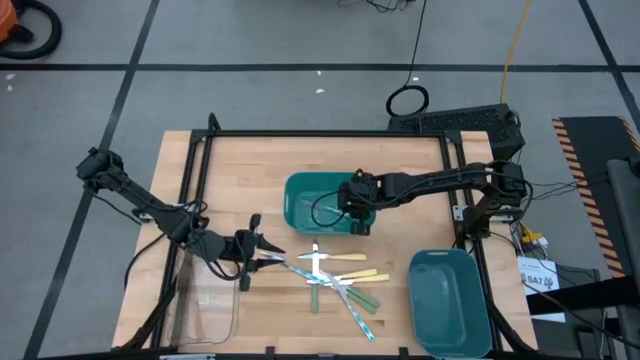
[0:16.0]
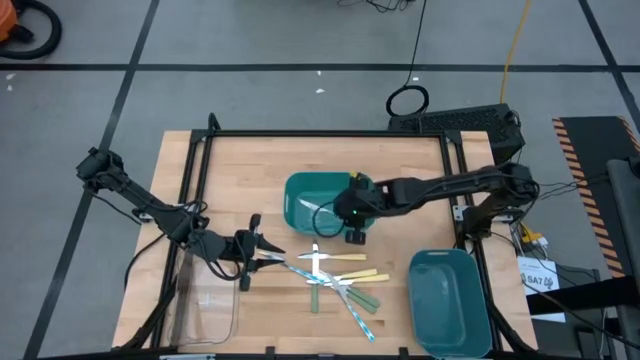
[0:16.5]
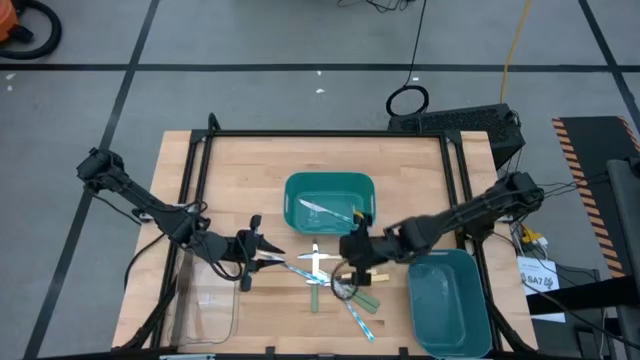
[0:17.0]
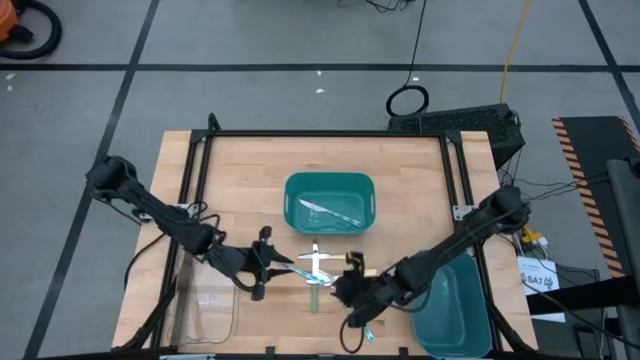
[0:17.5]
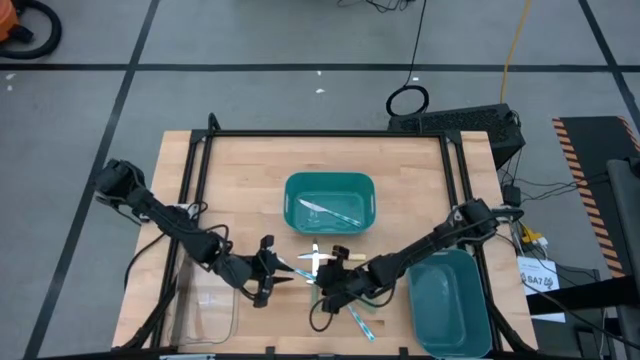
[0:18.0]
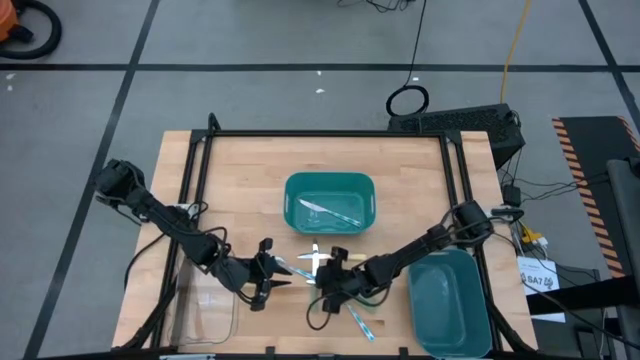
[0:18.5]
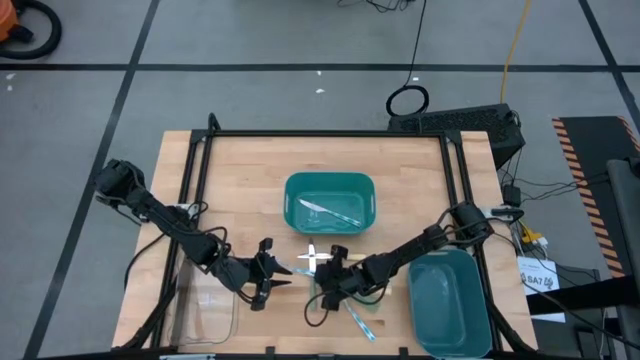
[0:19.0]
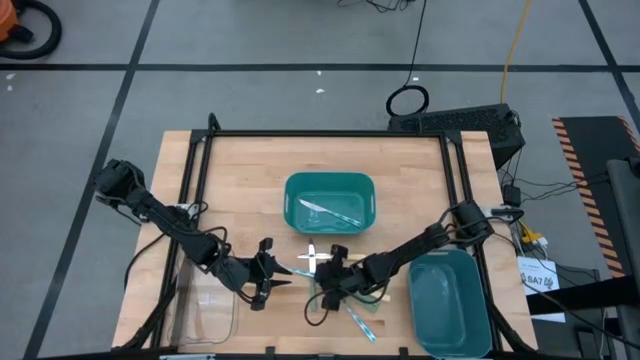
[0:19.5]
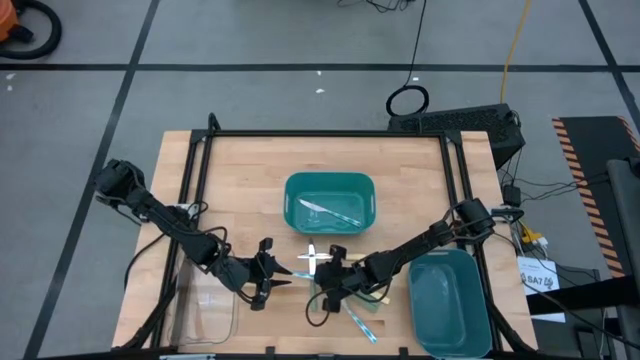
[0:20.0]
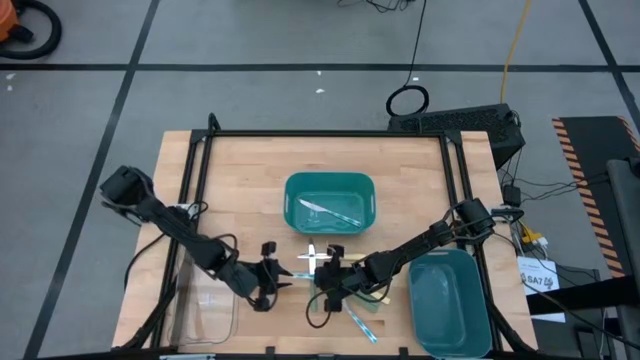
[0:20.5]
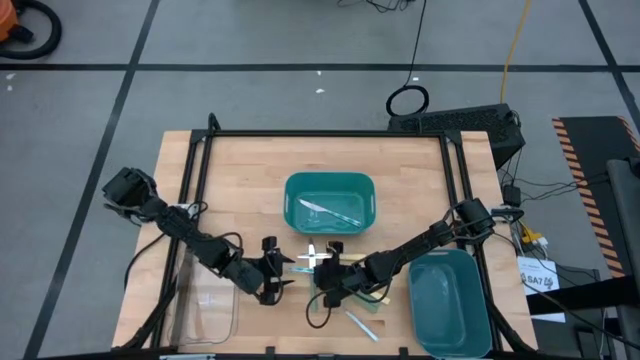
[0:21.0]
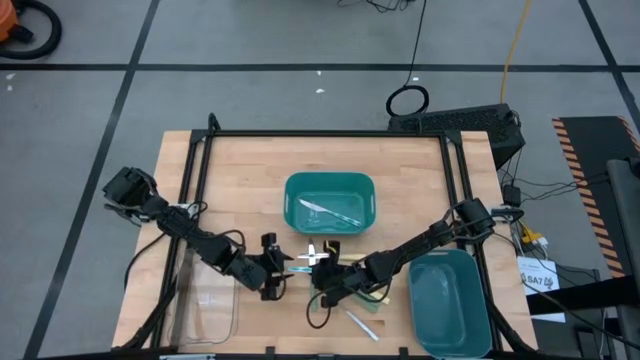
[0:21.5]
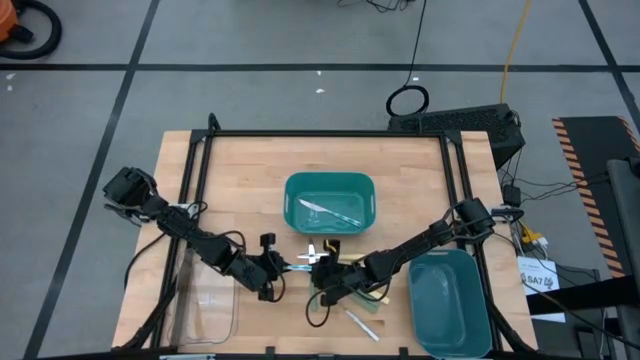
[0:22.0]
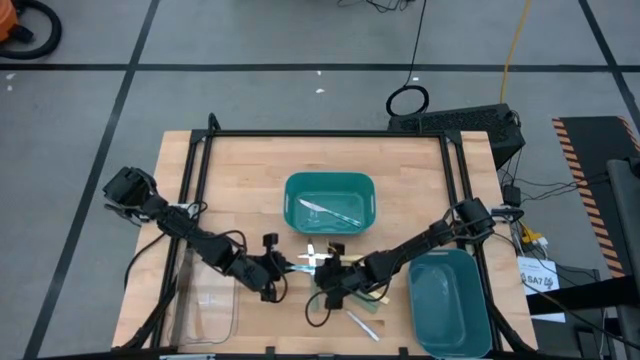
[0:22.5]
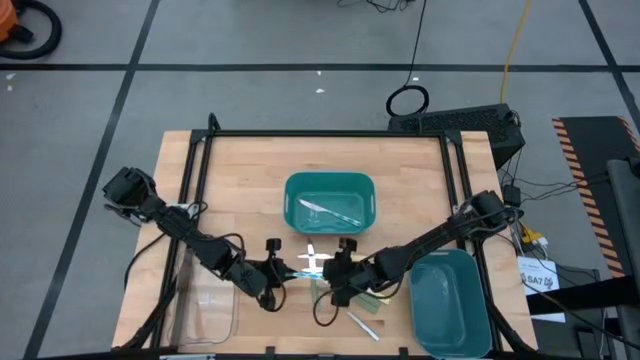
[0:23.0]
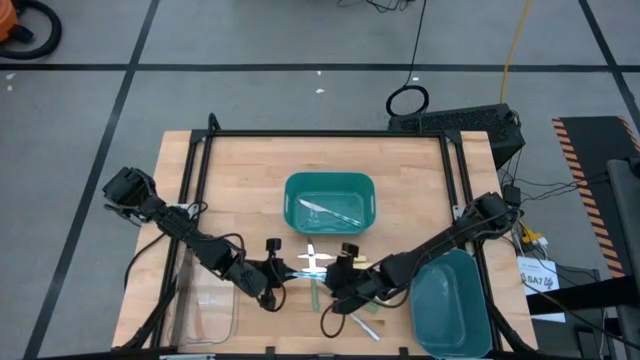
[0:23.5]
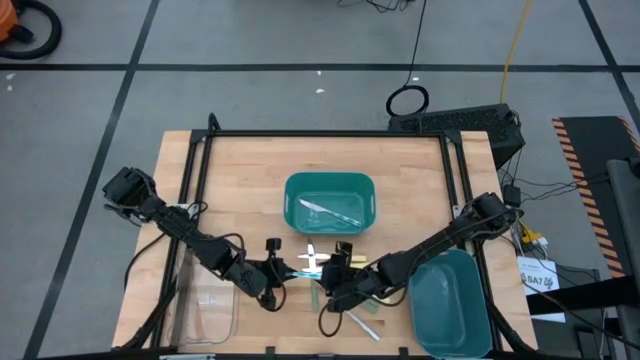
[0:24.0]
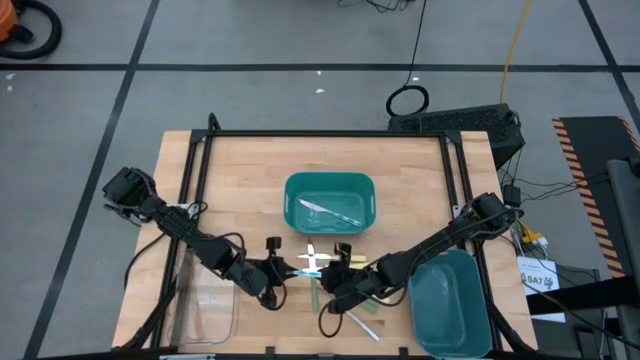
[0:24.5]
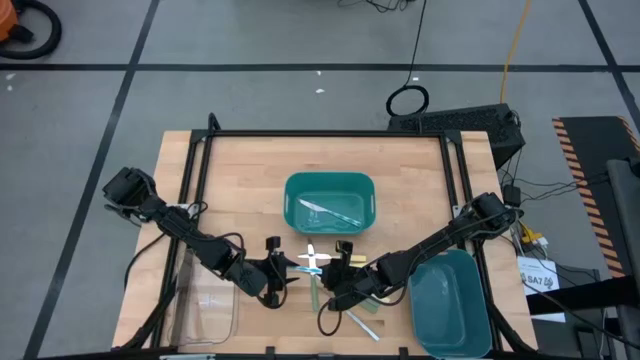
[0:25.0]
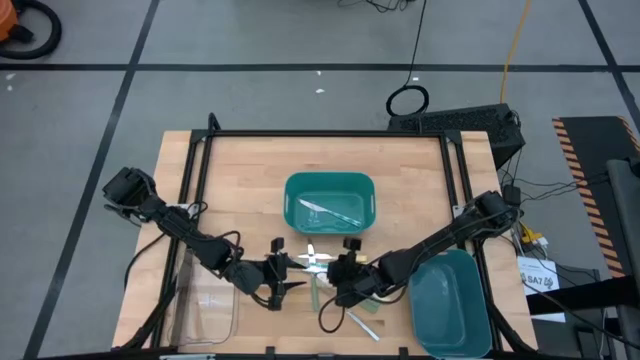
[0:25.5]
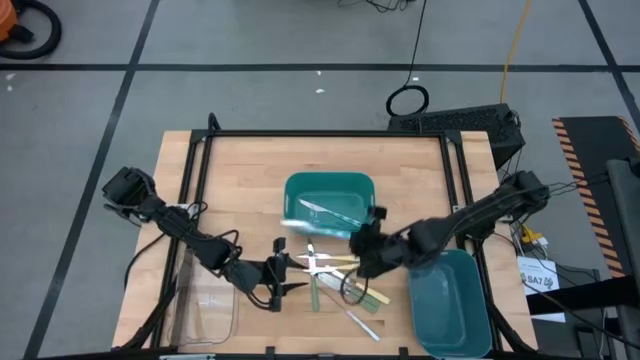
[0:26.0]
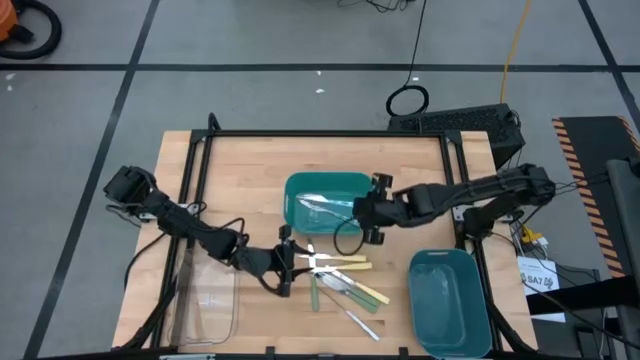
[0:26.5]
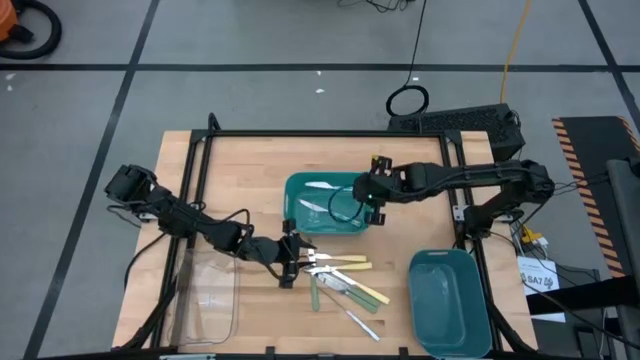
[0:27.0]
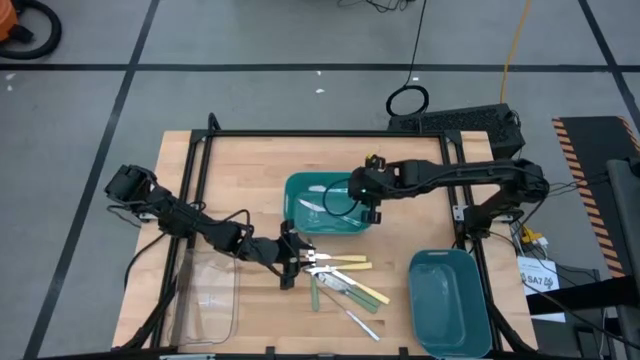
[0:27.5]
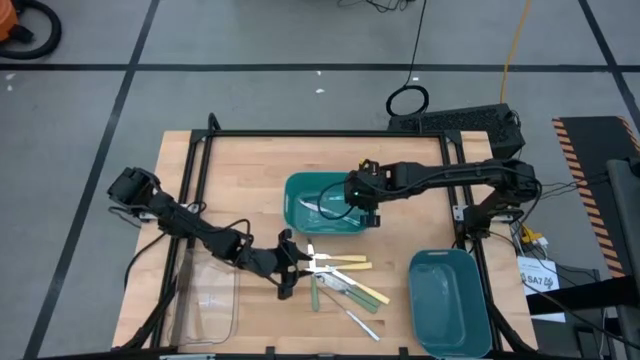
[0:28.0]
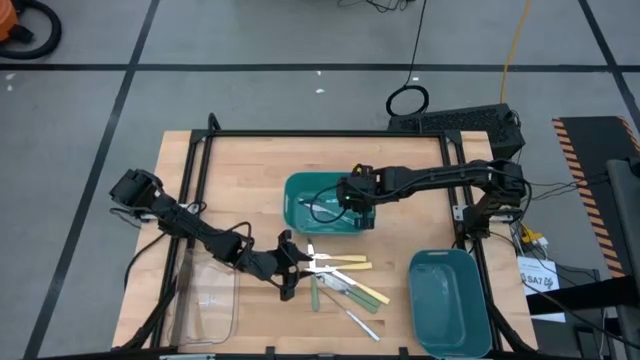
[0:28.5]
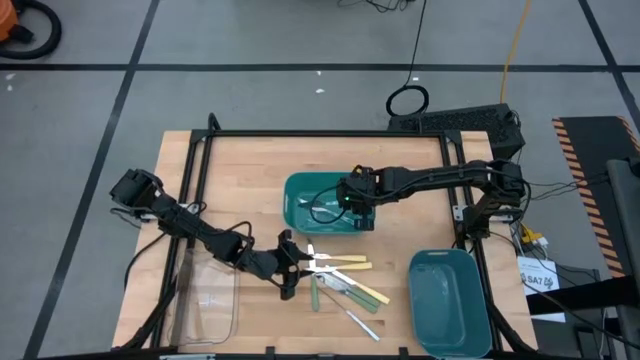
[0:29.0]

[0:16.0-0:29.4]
Task: Sort silverware by color (type)
Put the top blue knife into the green bin

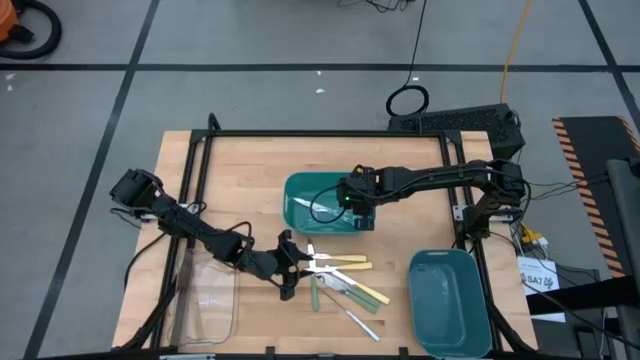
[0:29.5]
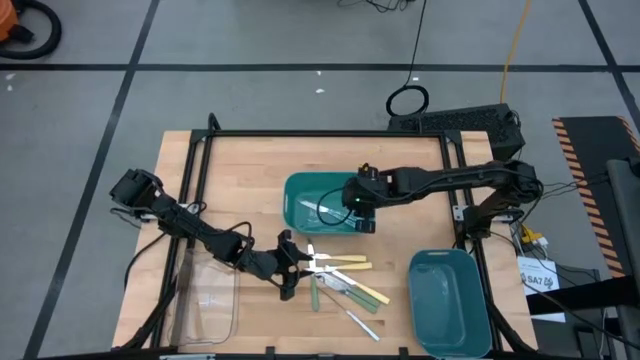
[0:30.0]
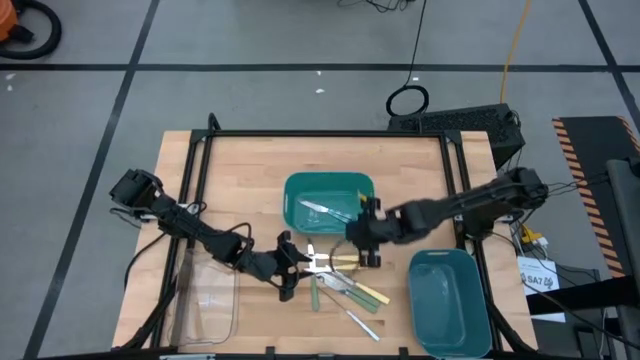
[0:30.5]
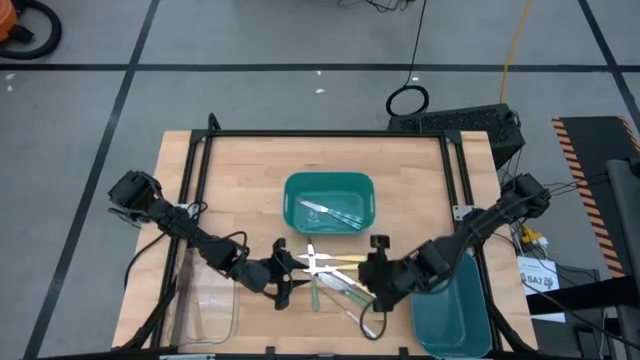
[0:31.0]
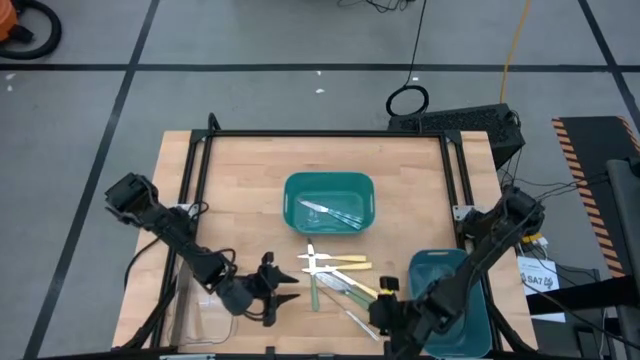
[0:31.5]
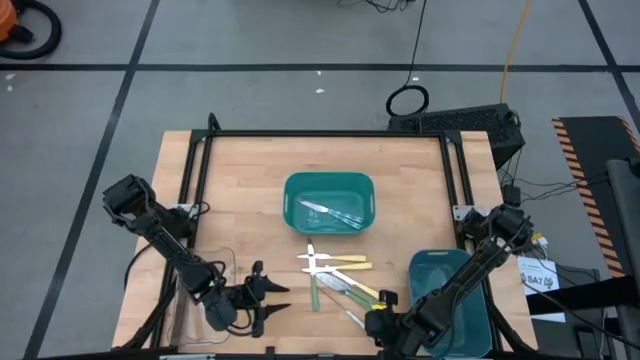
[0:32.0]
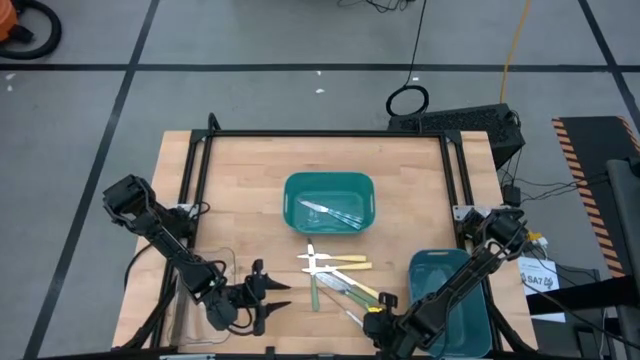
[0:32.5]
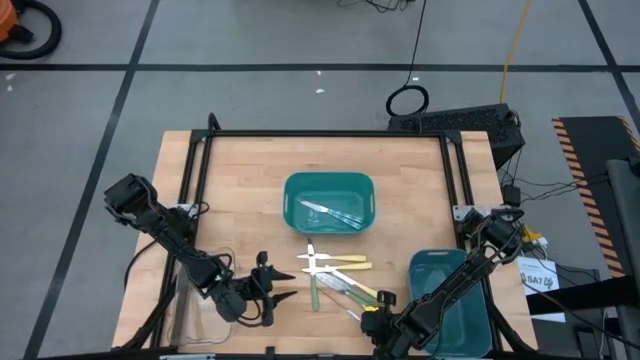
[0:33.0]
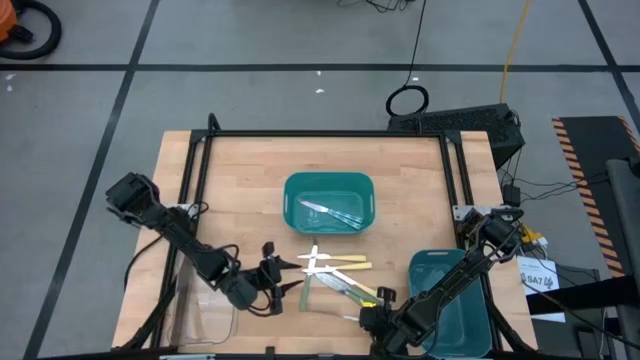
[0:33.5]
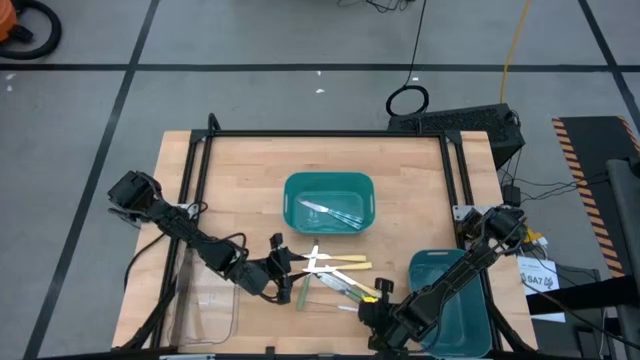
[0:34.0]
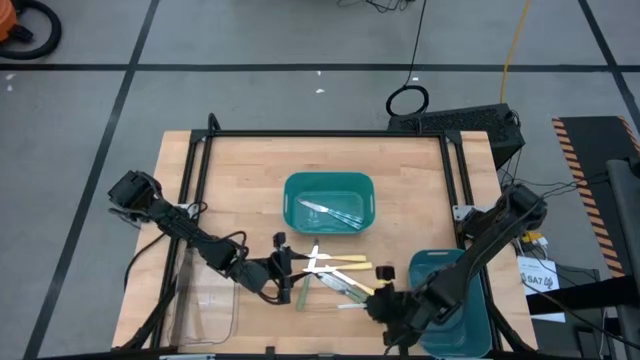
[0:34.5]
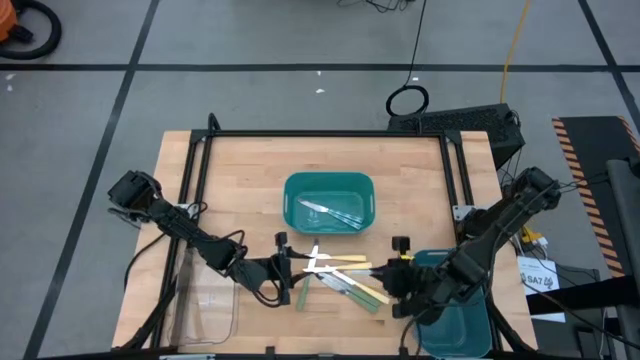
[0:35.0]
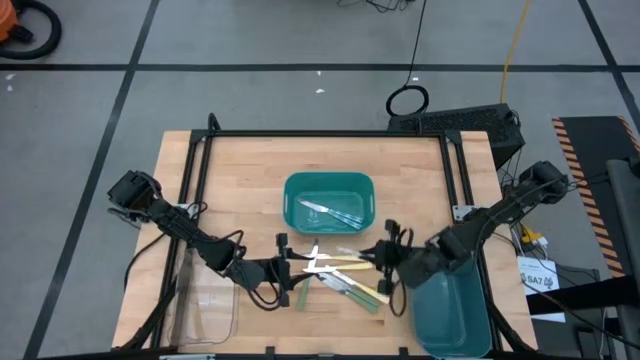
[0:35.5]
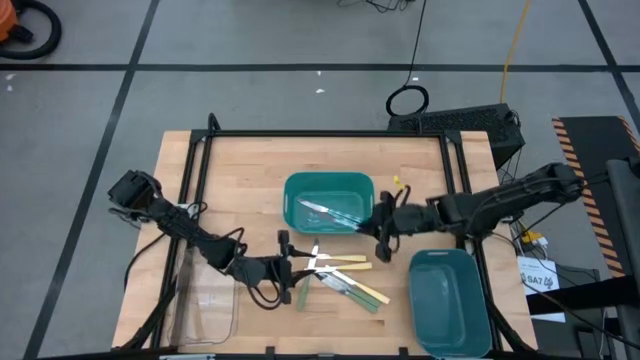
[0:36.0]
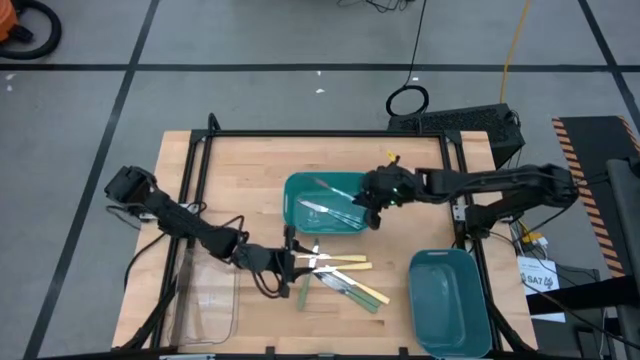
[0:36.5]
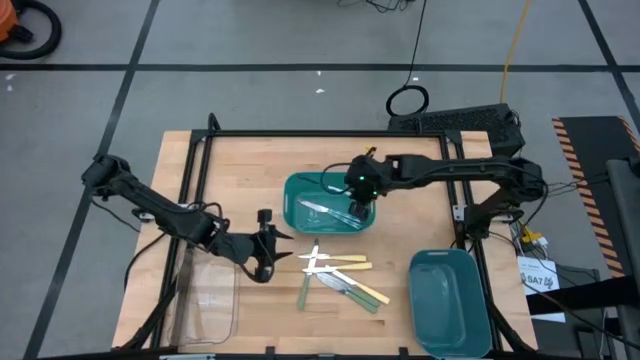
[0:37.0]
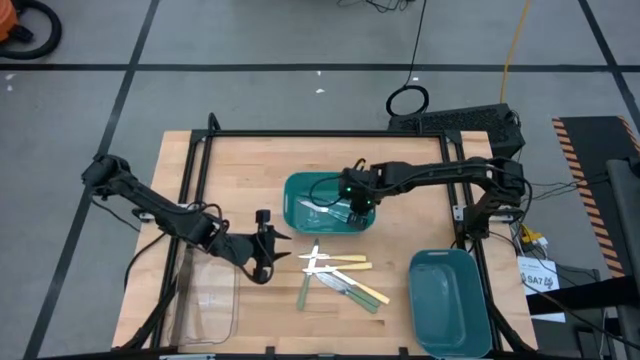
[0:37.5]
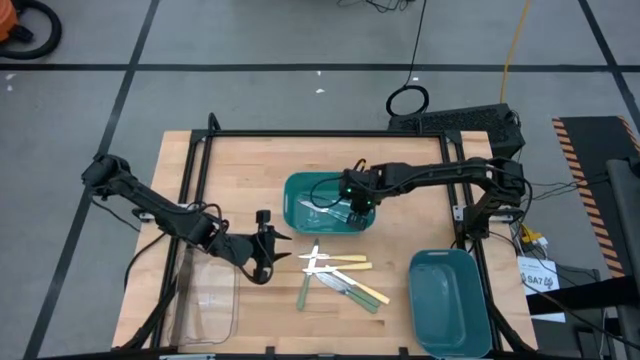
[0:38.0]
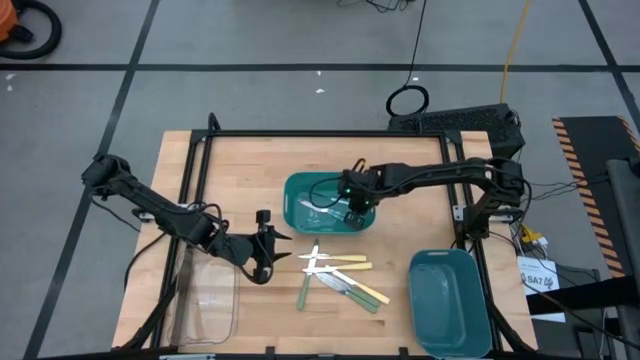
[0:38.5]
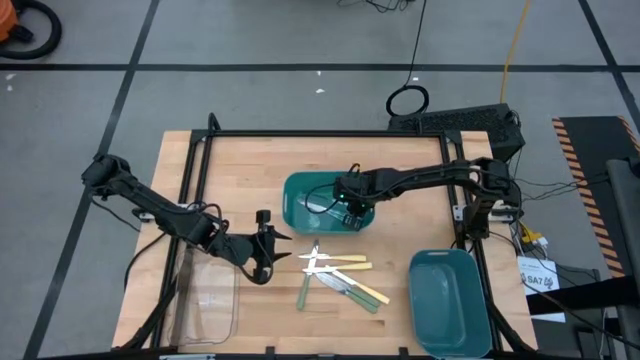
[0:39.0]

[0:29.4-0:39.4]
Put the blue knife into the green bin
